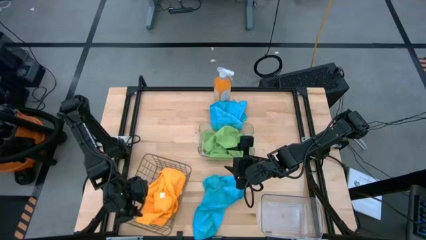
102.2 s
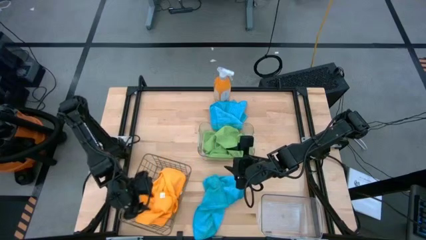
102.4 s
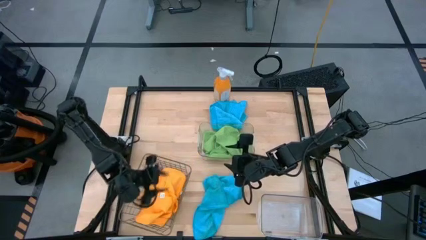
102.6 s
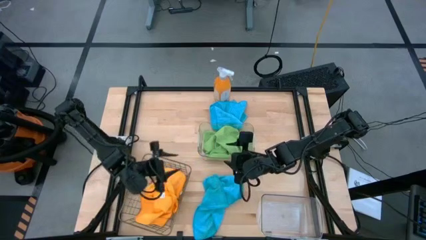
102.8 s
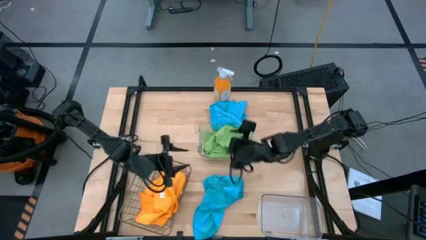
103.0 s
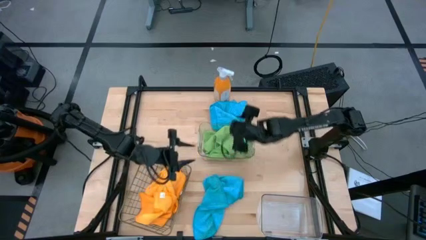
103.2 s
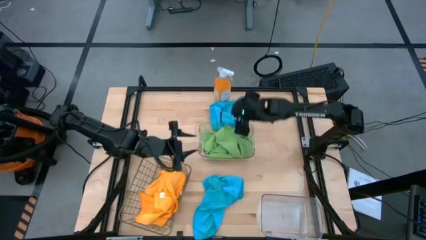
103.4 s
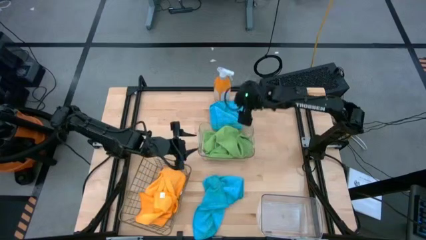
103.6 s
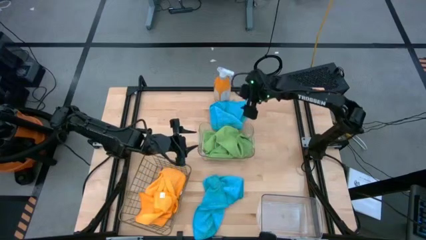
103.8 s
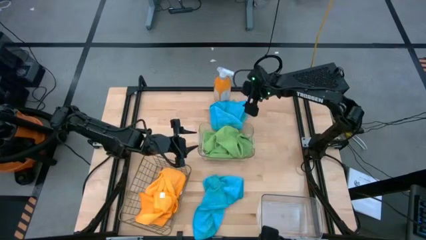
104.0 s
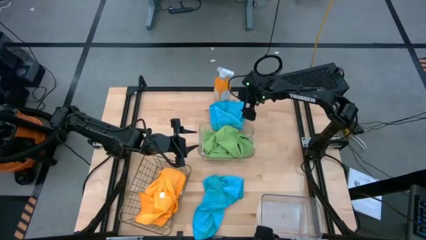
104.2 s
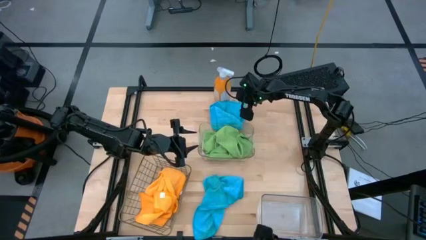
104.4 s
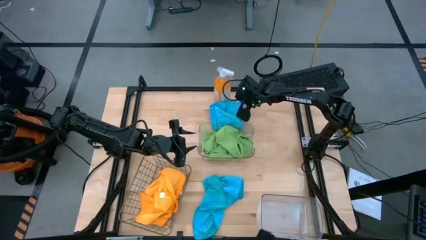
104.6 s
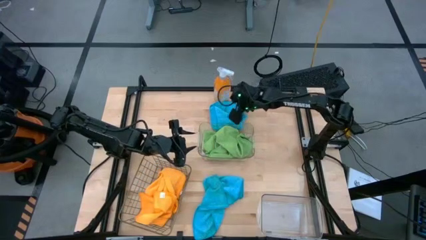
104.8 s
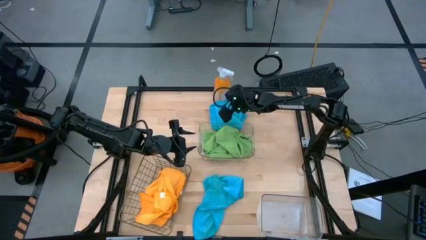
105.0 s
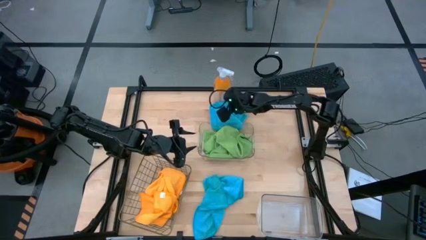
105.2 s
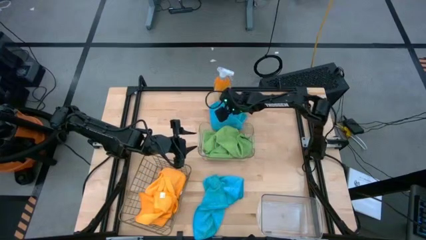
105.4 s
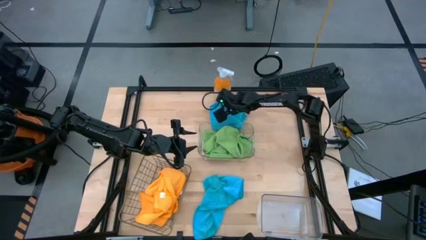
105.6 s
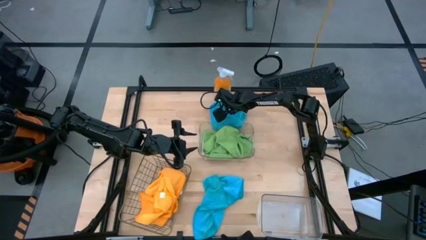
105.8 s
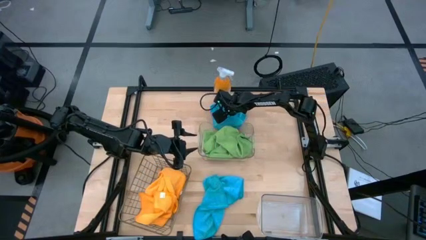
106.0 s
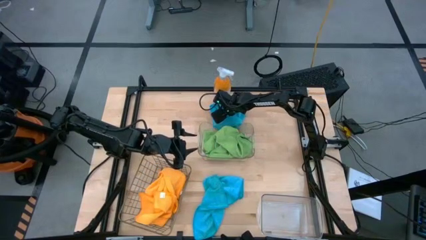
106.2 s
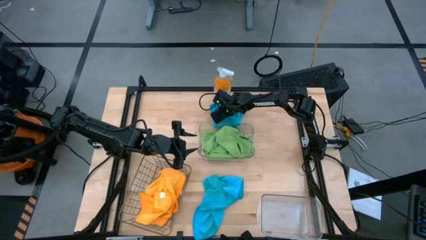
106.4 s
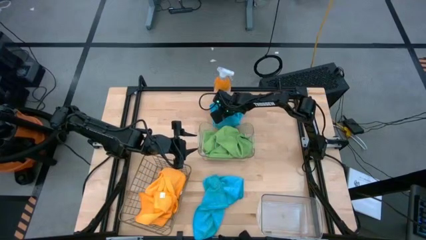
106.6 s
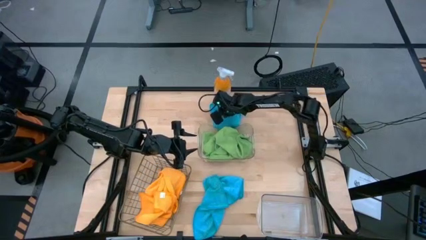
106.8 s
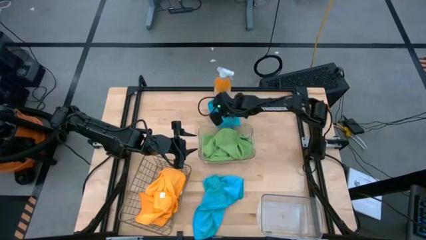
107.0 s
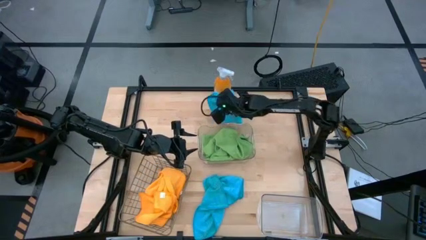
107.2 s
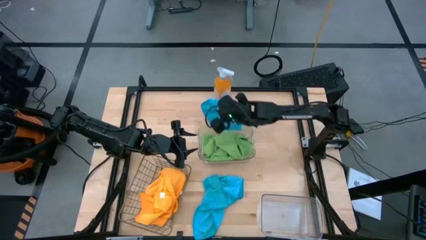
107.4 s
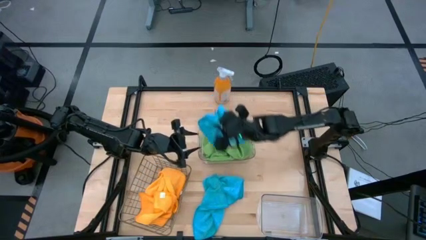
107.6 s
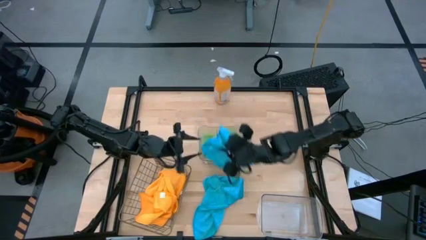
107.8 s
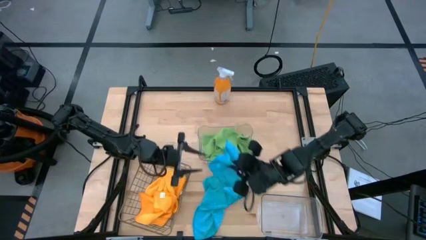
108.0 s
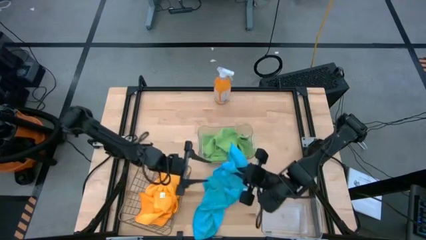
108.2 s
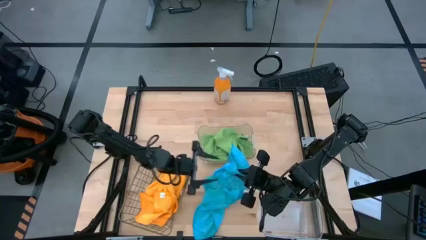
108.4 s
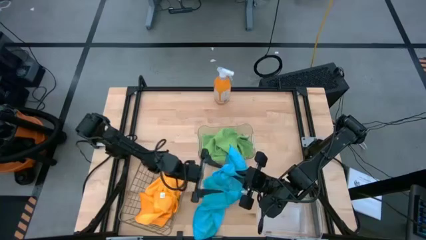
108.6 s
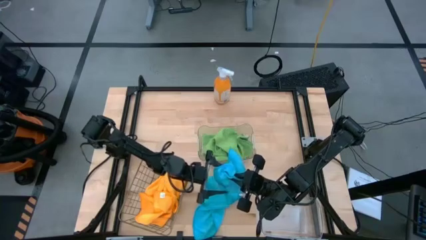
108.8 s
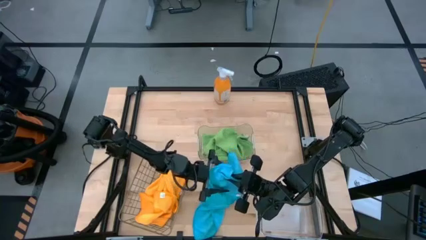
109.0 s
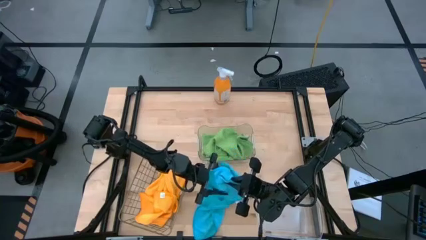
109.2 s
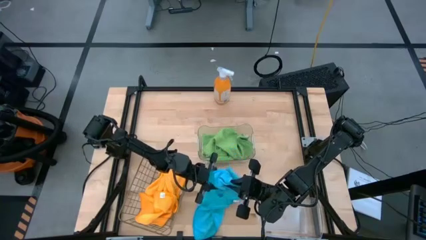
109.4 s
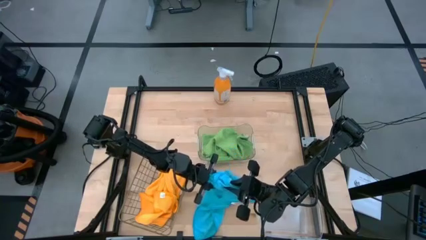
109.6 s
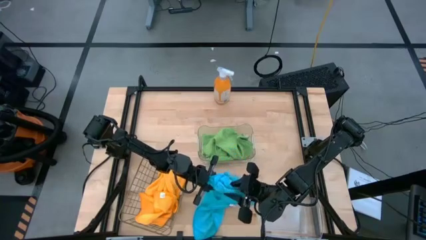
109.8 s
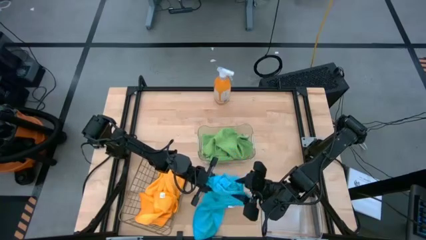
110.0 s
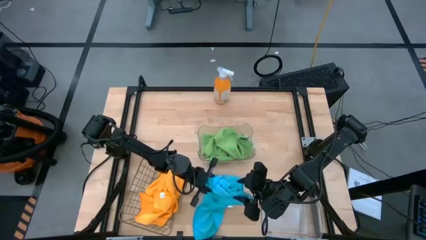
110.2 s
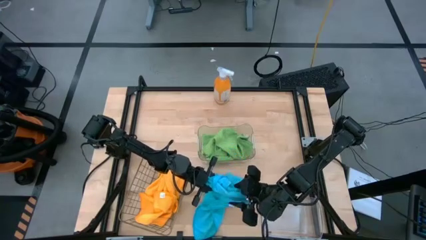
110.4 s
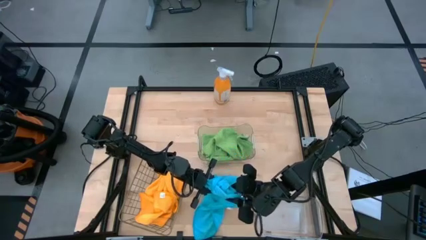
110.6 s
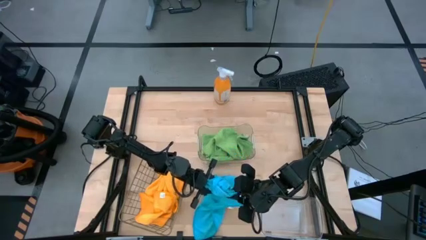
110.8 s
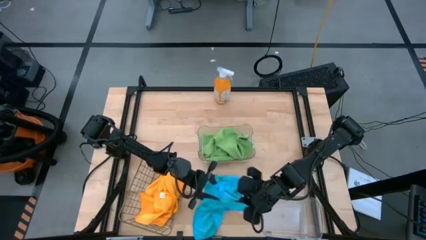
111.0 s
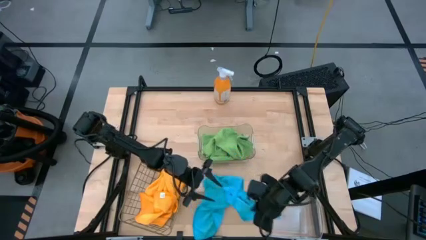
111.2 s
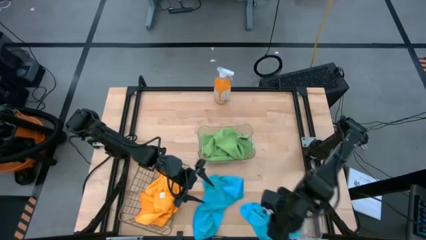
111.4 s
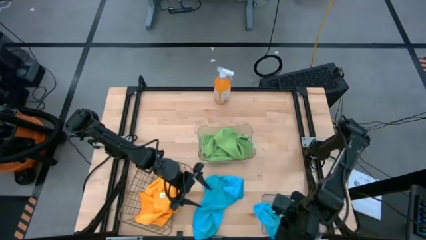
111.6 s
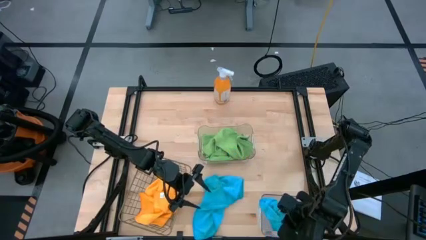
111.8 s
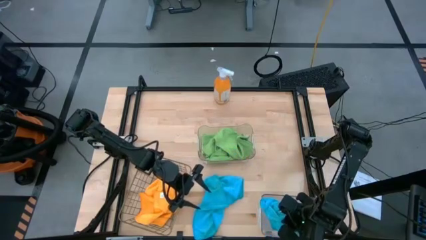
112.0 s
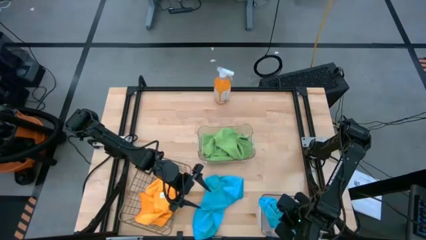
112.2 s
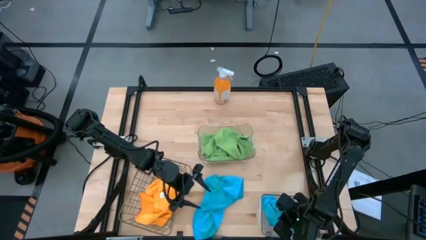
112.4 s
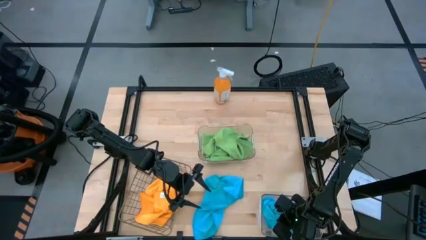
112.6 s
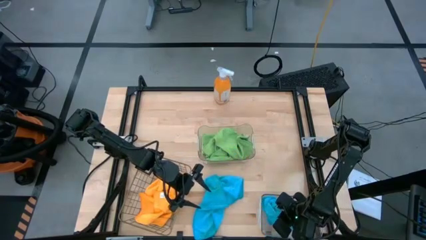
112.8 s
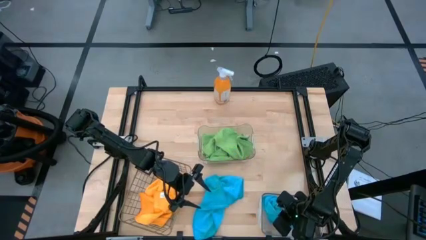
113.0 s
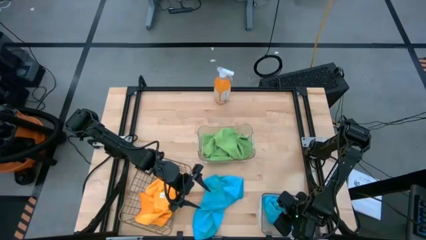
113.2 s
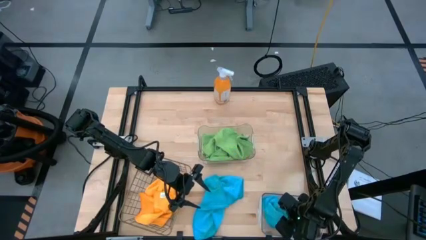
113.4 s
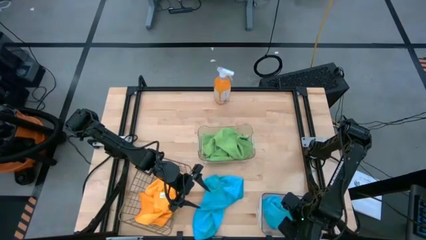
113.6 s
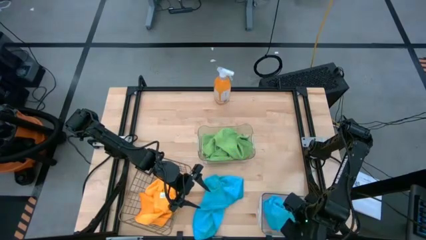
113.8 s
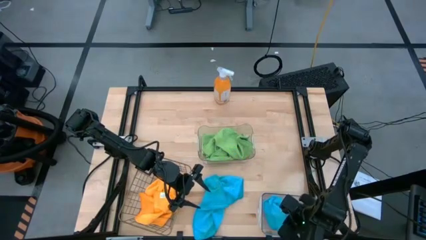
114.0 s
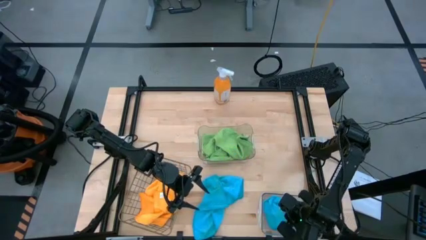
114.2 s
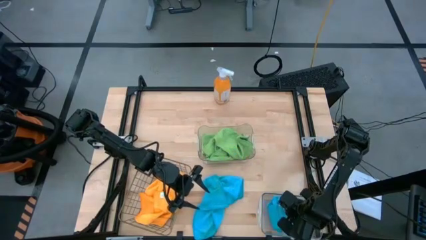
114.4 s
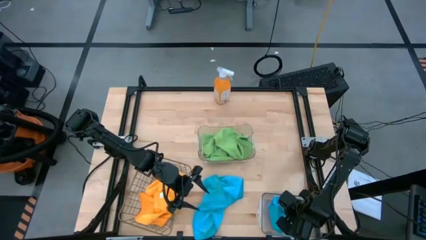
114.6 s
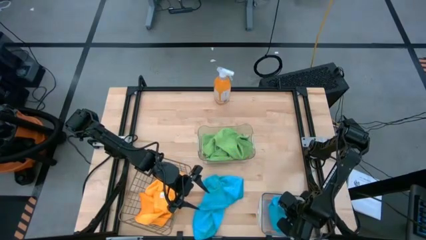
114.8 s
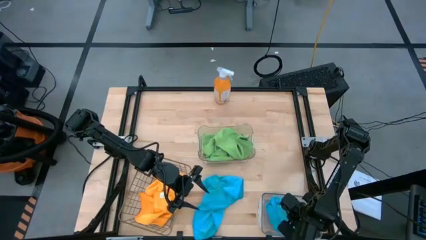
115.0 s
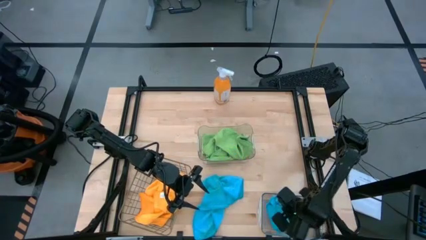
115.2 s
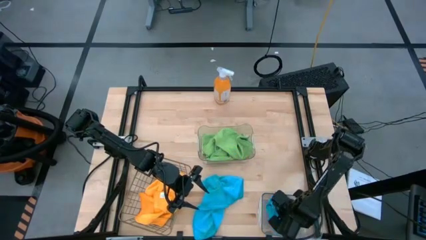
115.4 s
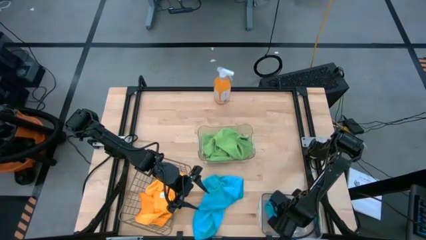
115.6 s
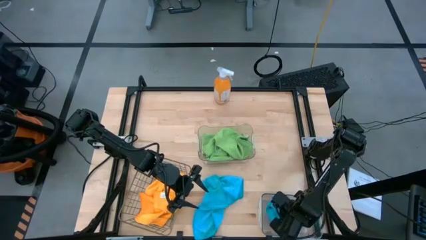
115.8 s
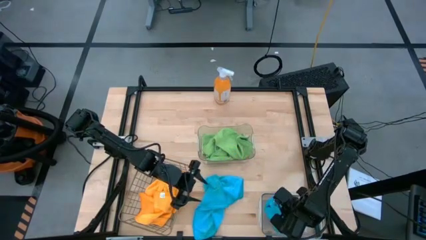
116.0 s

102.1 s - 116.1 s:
Task: Sort microfiber towel by color & place in baskets
Put the top blue towel into the bottom transparent bin

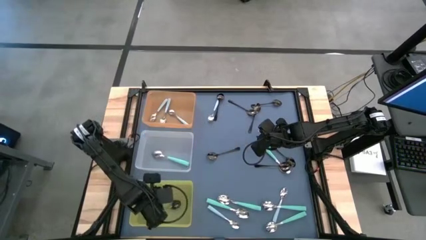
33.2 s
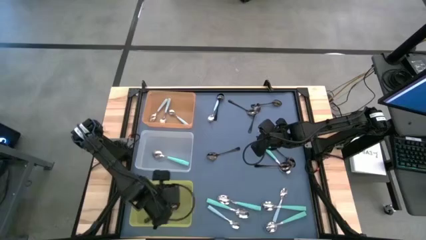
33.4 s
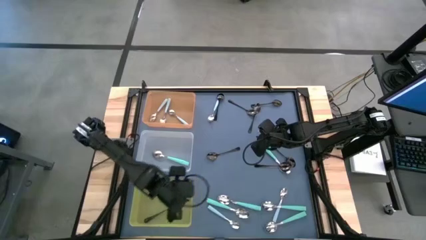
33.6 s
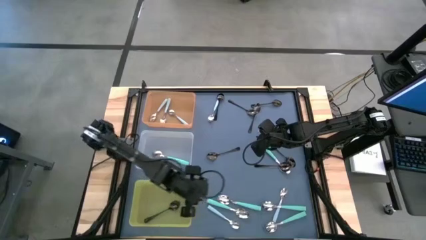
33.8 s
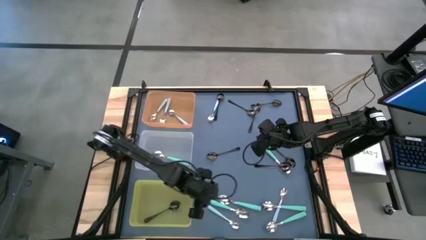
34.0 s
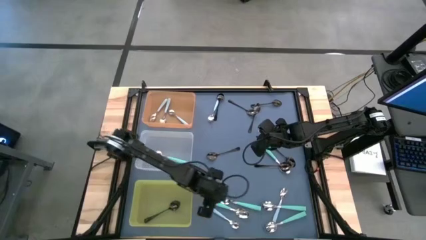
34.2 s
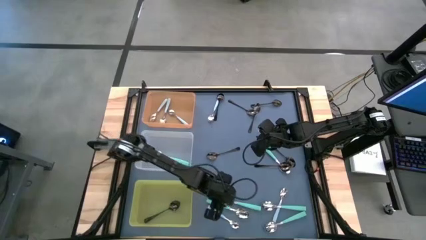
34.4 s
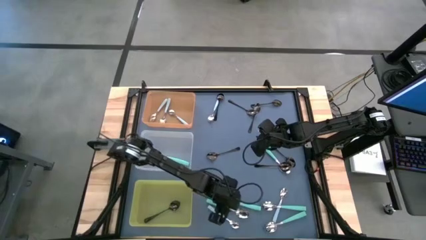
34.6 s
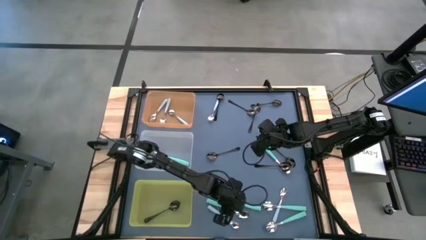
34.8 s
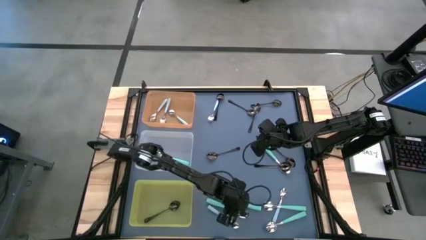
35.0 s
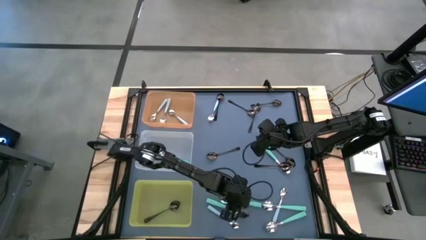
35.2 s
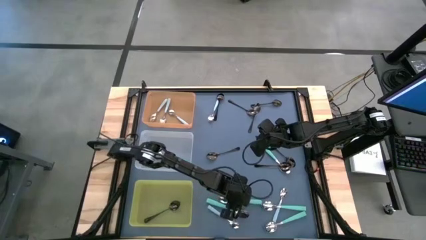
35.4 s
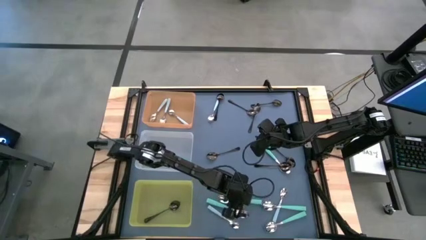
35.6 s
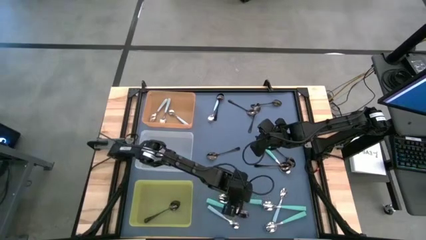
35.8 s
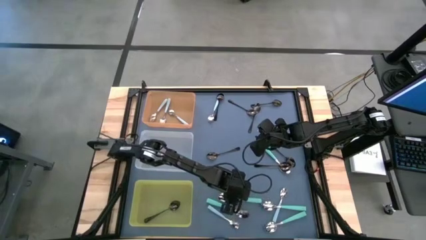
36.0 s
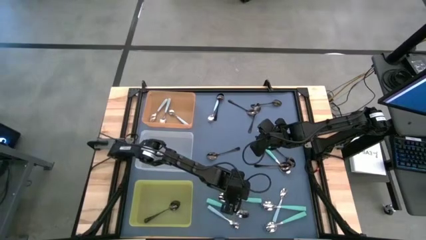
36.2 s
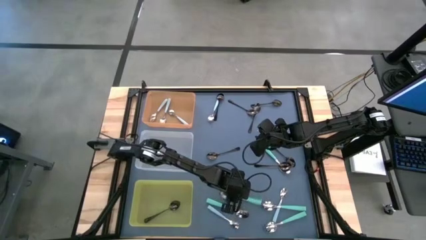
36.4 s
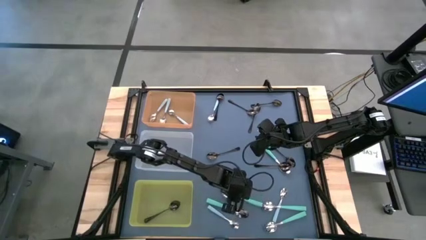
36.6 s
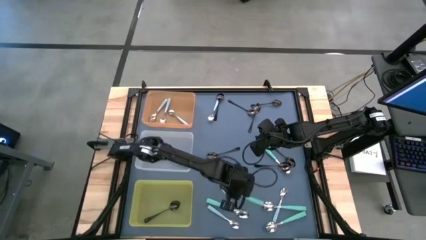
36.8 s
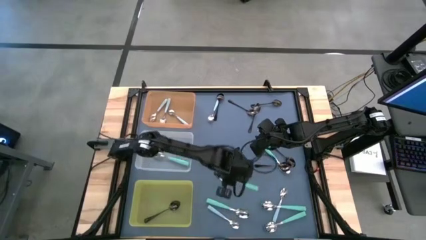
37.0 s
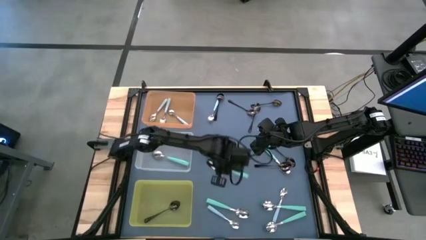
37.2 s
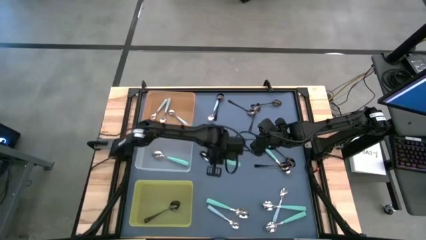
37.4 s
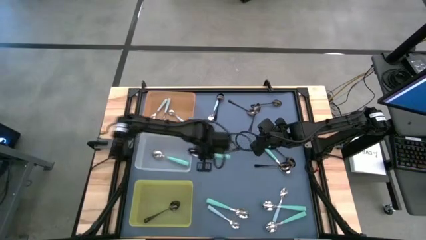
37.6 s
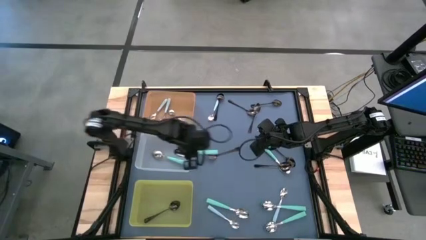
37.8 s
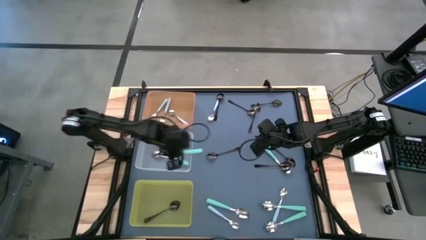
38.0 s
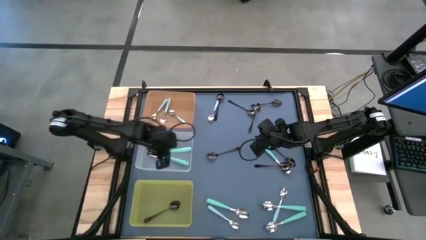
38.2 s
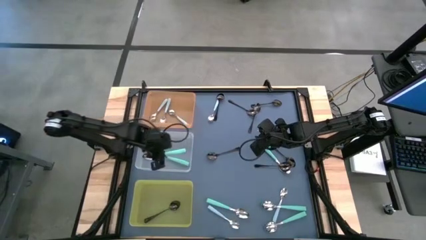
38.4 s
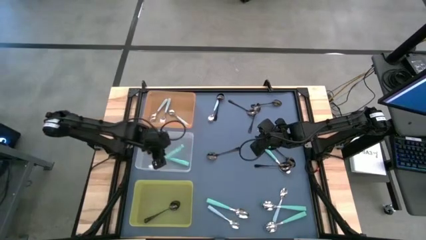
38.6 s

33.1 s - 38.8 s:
Task: Sort silverware by color (type)
Put the light green spoon into the transparent bin
